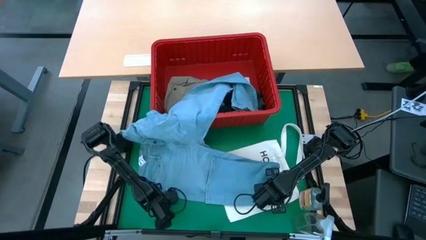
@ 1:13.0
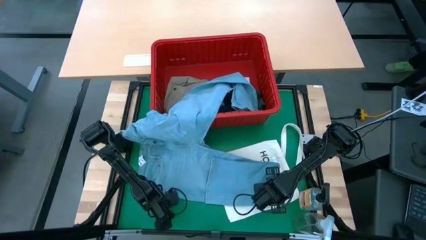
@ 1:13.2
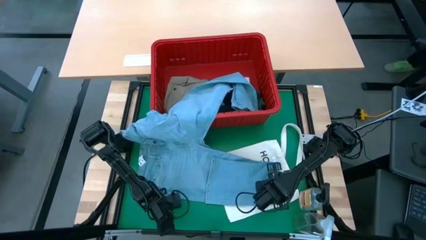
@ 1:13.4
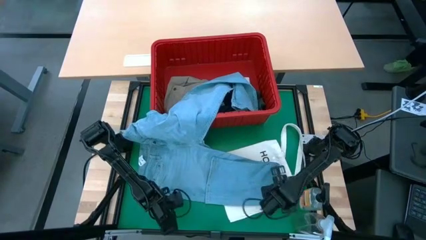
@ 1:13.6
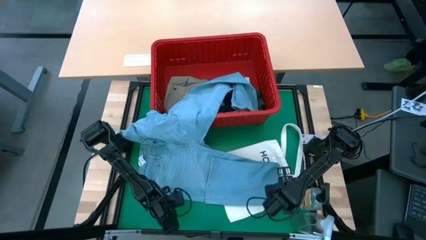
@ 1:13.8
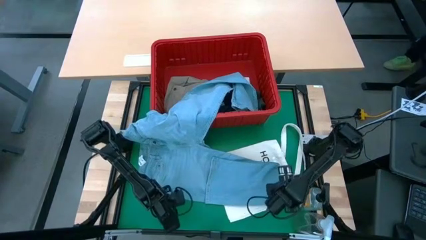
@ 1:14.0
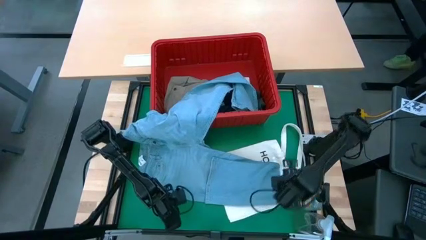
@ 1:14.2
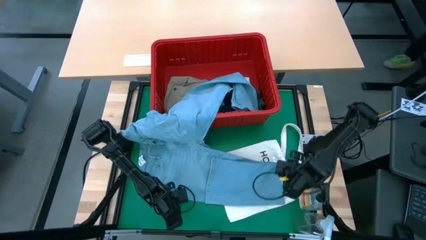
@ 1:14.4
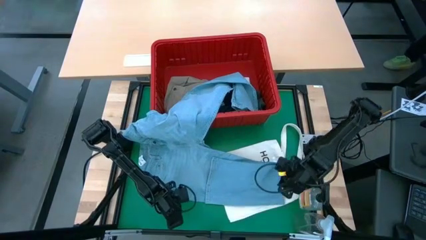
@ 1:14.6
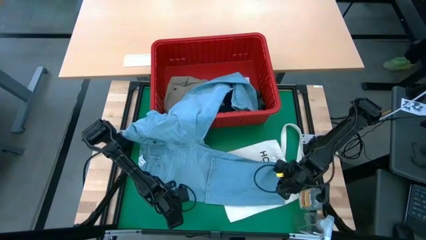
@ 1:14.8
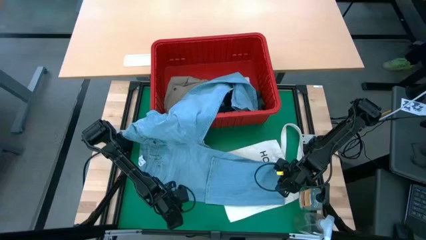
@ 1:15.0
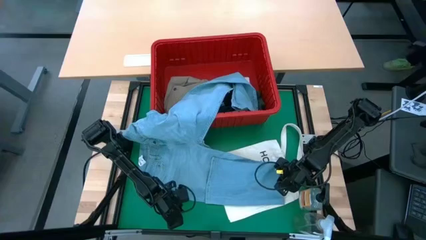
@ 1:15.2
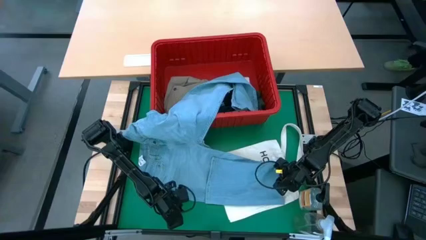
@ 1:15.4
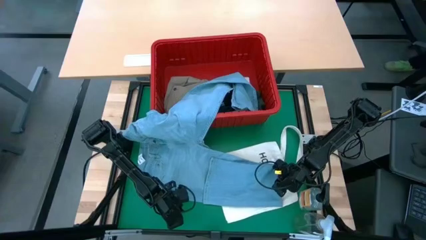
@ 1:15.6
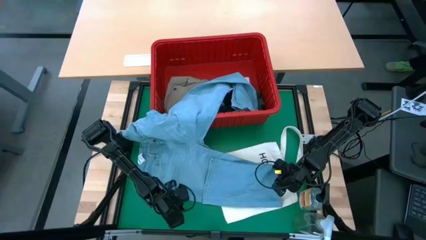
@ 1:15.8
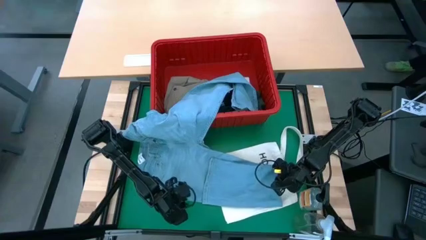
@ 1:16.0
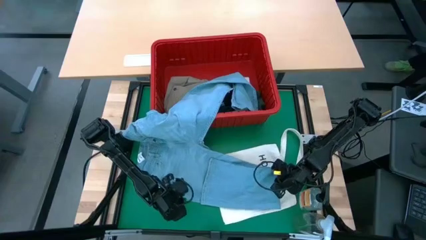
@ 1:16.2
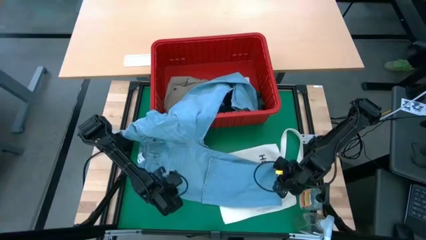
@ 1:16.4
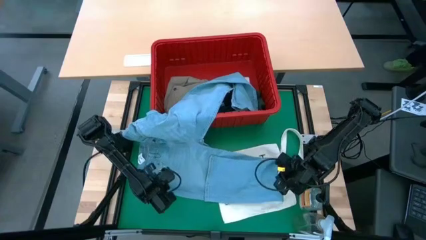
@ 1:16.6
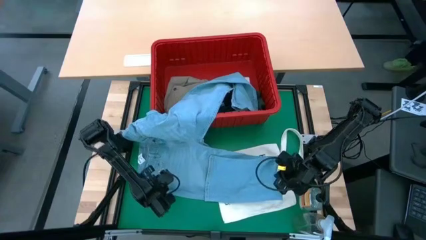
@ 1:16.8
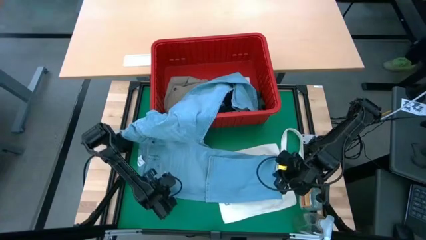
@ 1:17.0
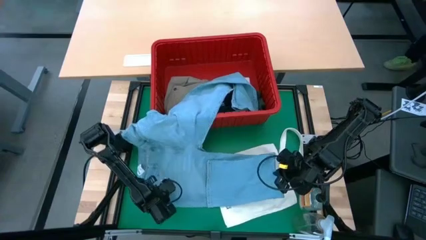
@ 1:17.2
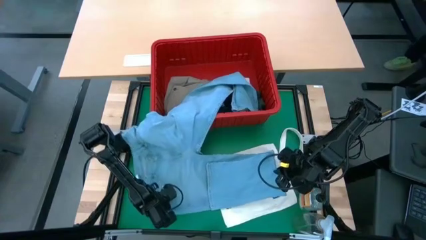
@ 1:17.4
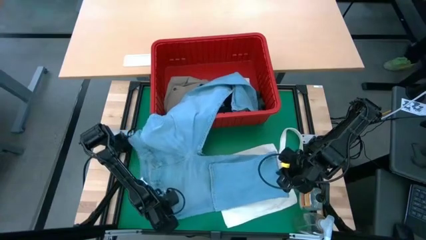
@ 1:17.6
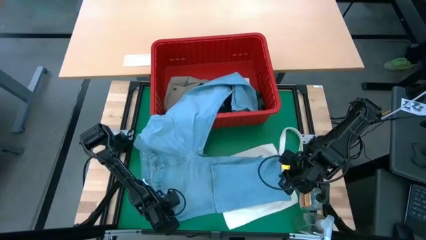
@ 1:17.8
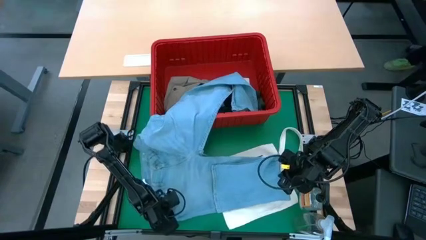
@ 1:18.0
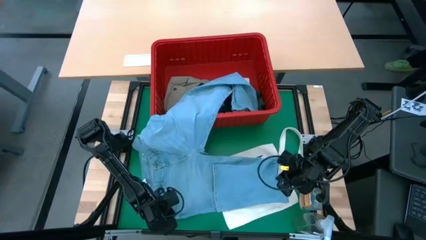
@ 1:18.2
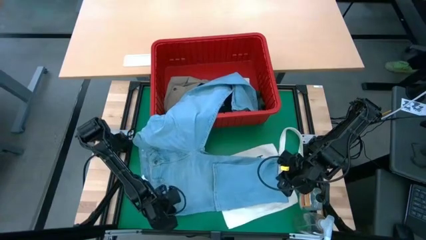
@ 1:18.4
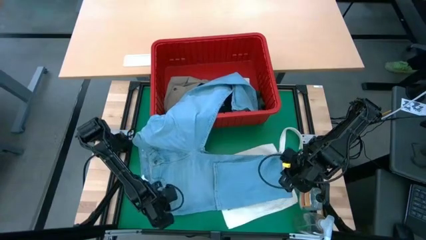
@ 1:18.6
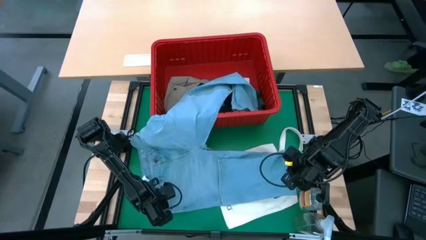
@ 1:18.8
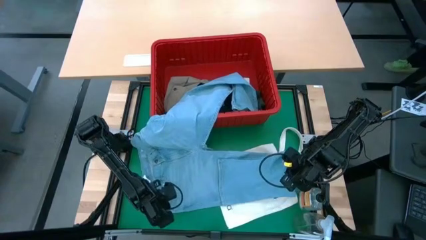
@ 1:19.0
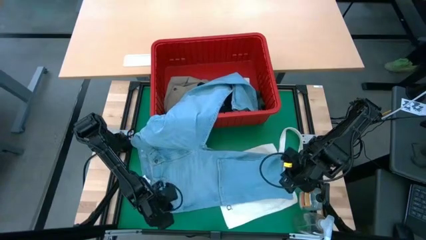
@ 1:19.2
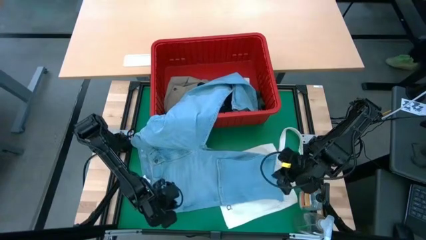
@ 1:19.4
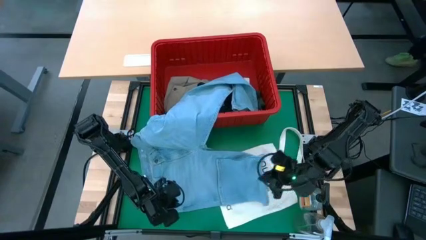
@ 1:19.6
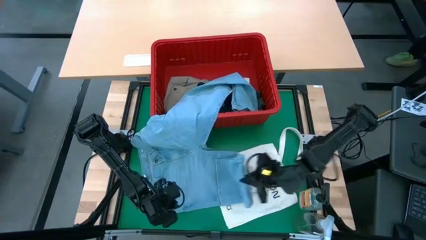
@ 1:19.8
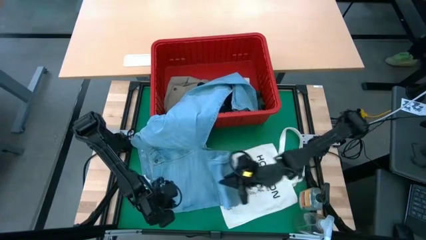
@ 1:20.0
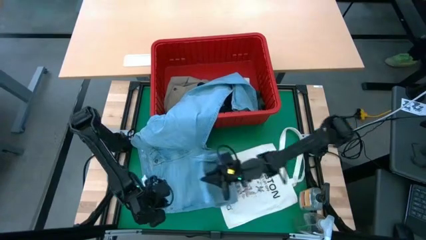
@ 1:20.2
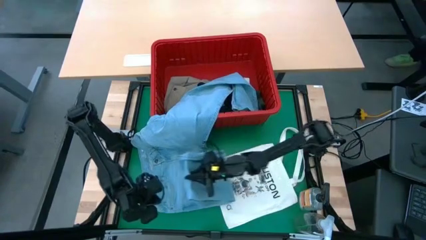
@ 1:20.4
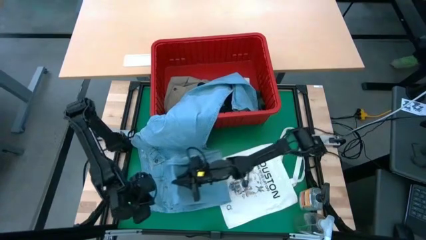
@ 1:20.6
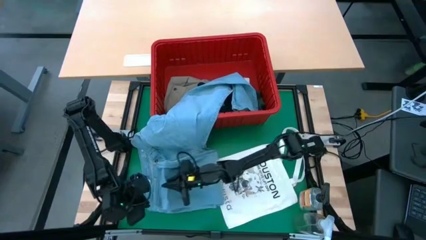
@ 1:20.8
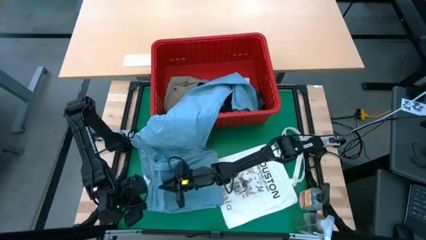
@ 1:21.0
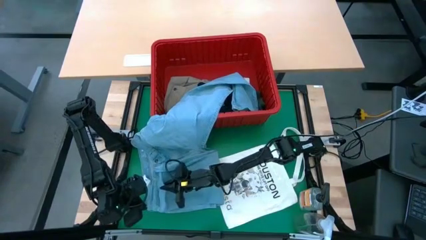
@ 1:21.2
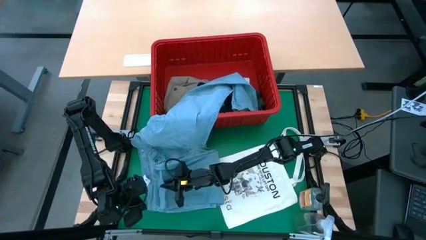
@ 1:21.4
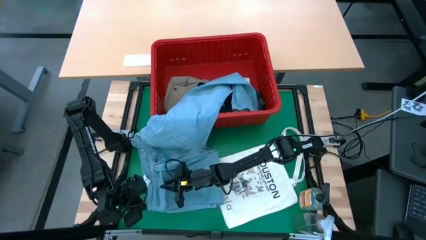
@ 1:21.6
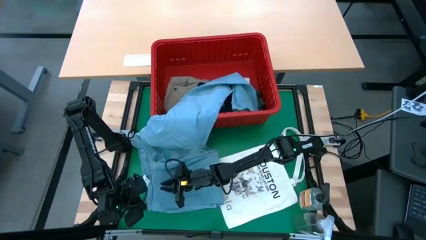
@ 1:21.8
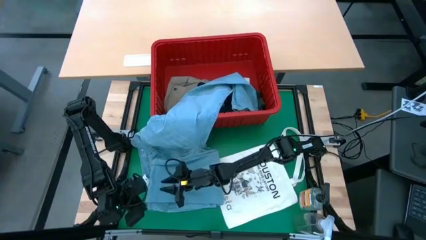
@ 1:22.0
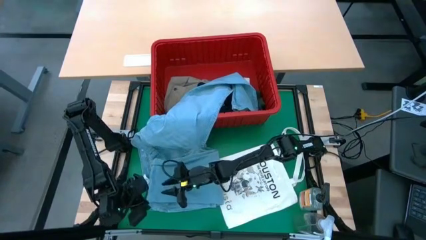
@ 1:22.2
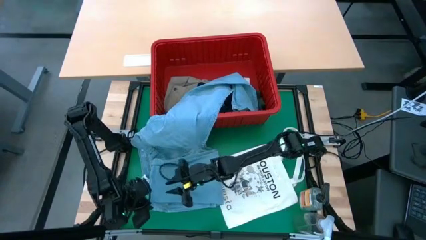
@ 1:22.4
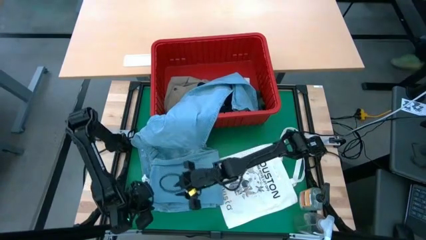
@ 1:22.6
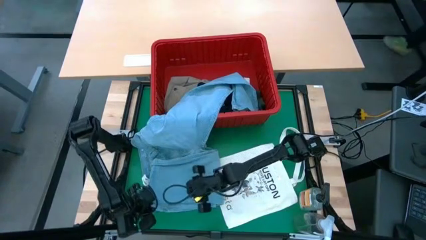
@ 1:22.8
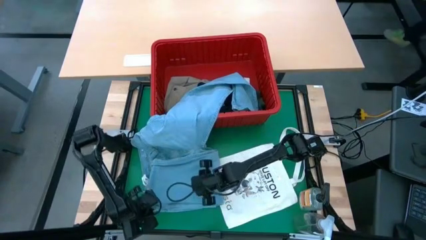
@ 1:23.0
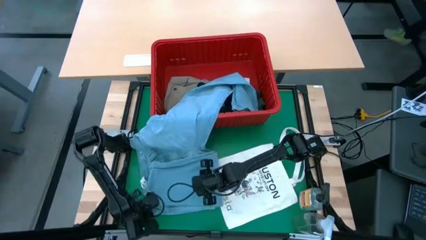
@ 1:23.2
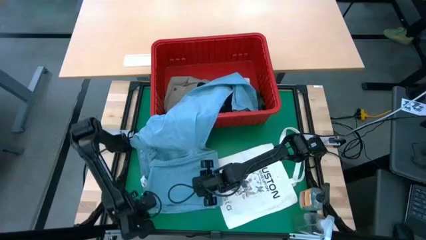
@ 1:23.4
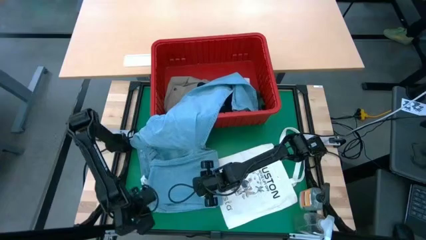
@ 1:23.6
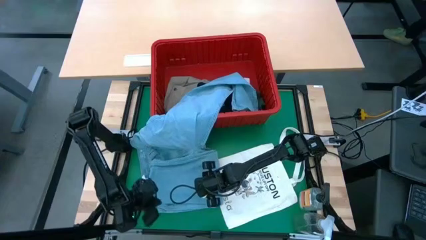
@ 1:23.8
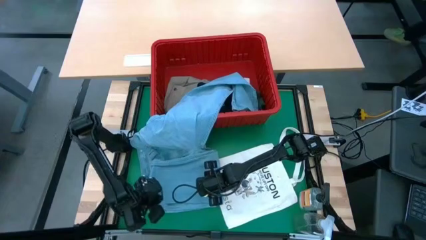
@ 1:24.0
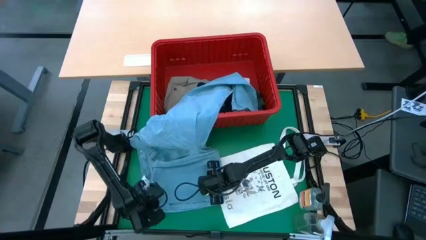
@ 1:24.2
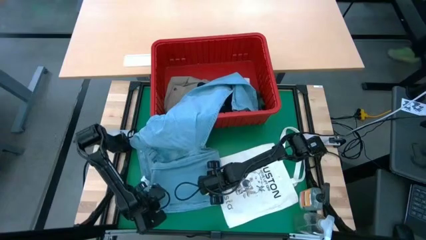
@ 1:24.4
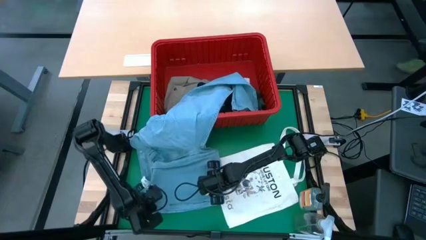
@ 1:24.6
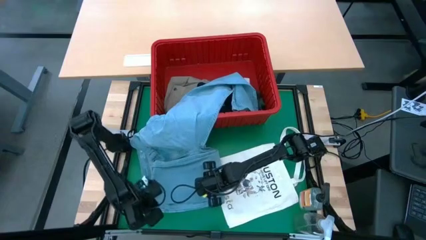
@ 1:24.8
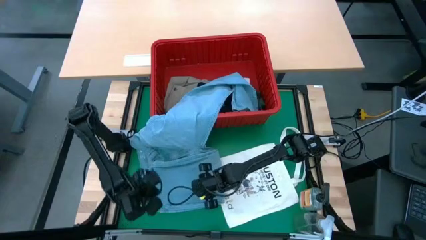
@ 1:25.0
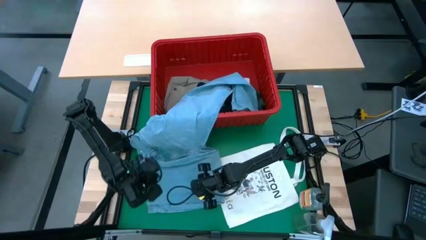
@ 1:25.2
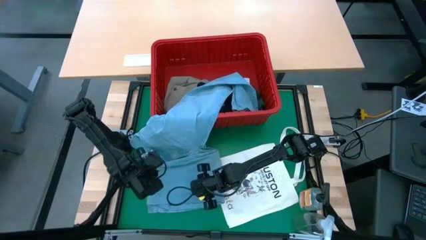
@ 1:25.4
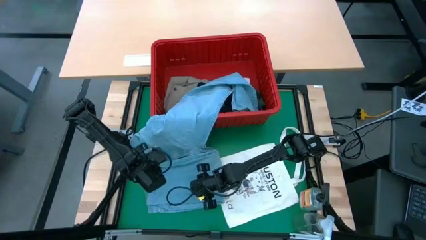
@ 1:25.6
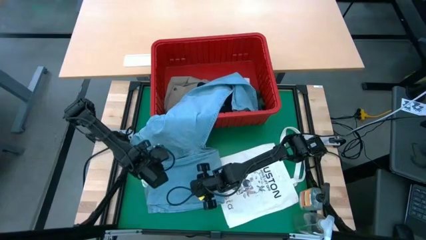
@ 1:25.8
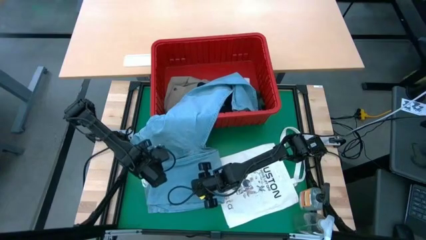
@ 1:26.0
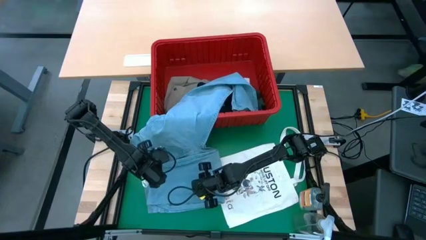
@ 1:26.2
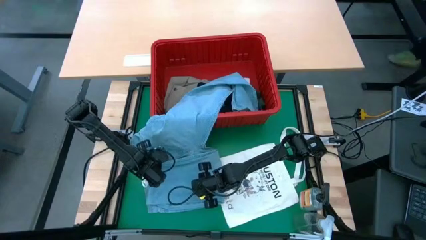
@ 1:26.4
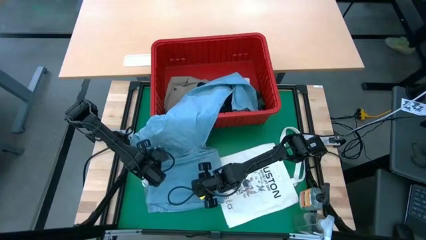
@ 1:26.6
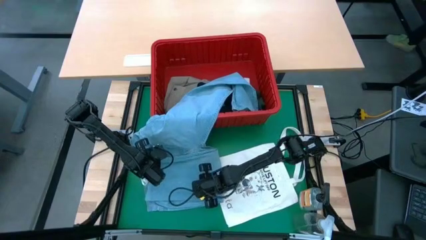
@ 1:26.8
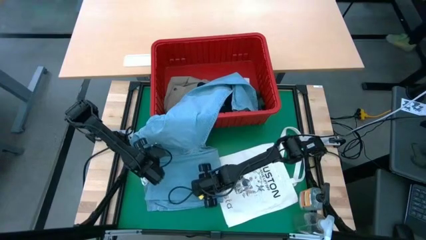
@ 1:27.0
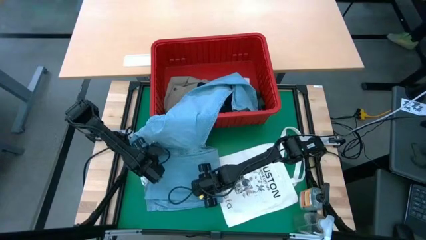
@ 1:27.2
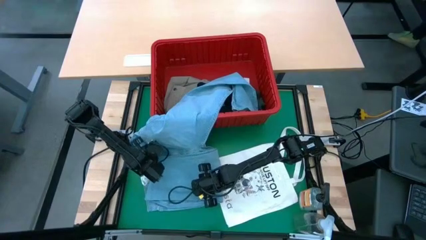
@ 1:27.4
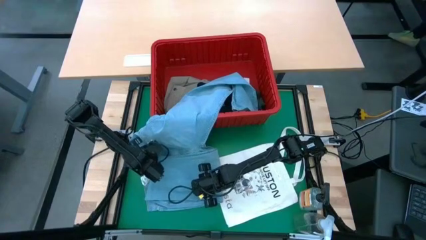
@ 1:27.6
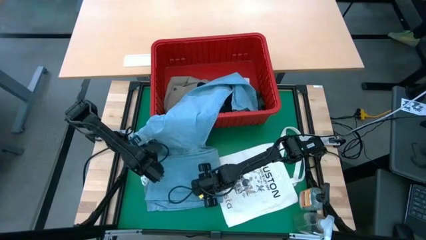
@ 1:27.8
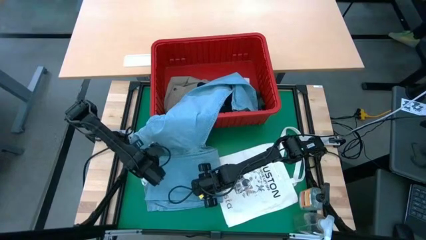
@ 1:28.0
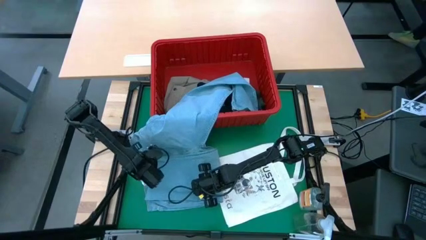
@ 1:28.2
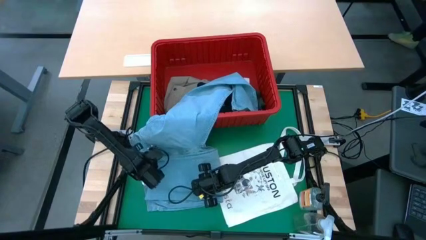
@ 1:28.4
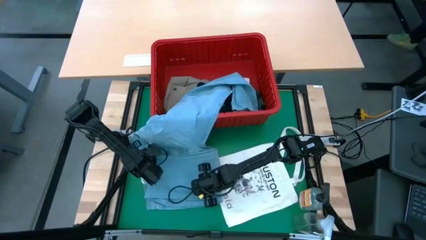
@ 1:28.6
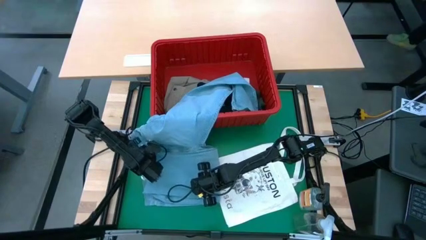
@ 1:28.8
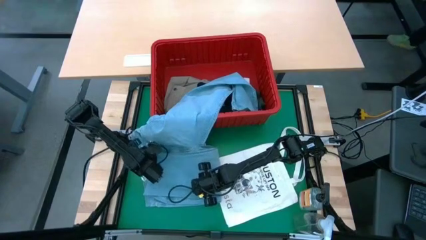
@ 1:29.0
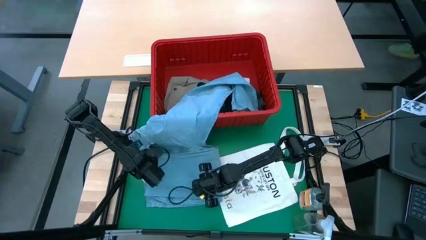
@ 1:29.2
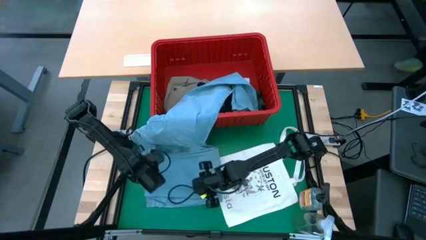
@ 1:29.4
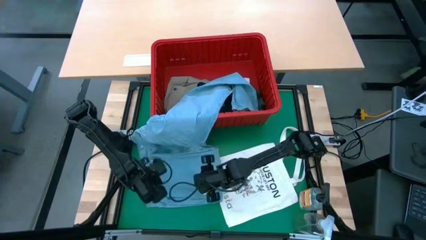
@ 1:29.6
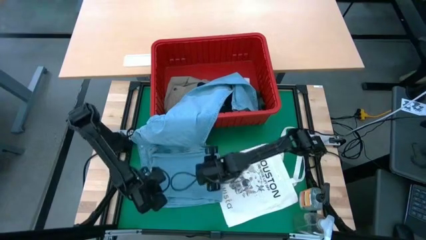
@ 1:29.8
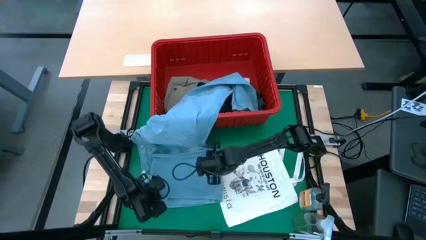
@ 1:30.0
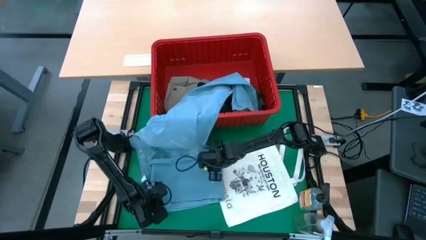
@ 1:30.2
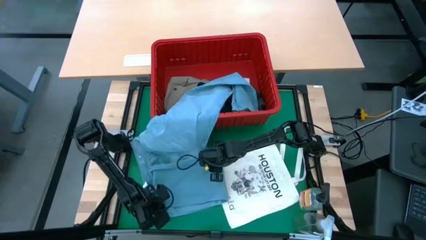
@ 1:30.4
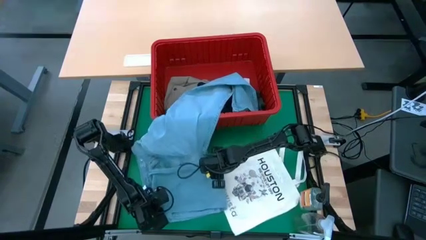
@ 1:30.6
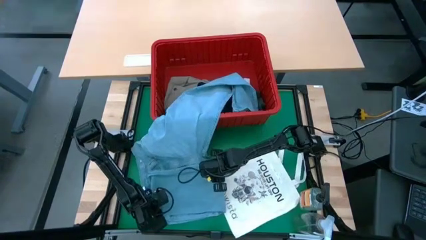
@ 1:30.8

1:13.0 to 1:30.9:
Task: Fold Laundry from Bin
Fold the blue jeans
